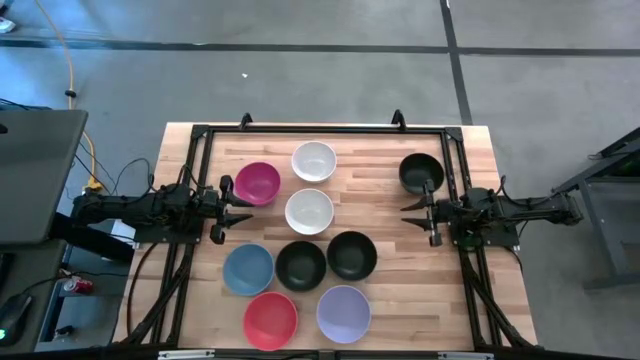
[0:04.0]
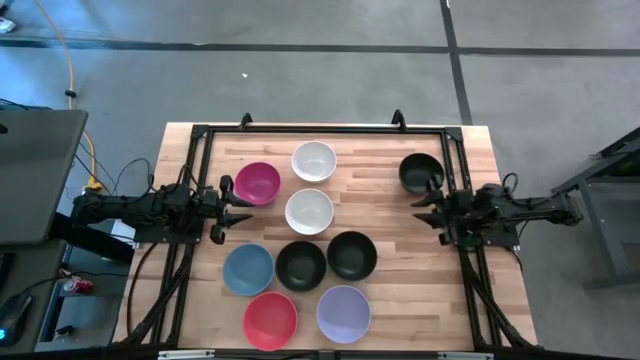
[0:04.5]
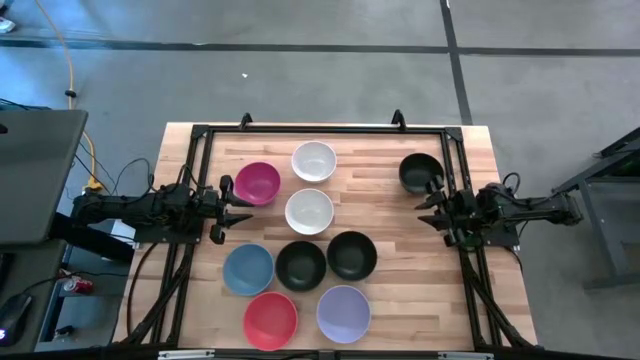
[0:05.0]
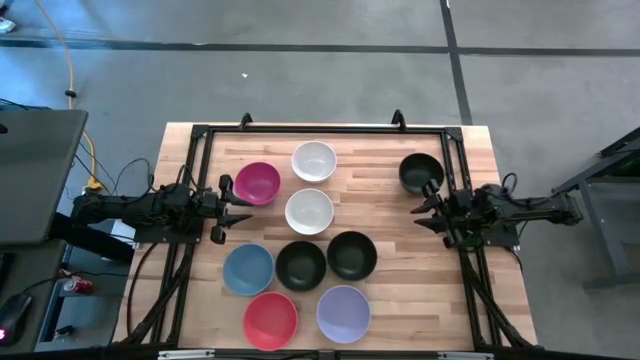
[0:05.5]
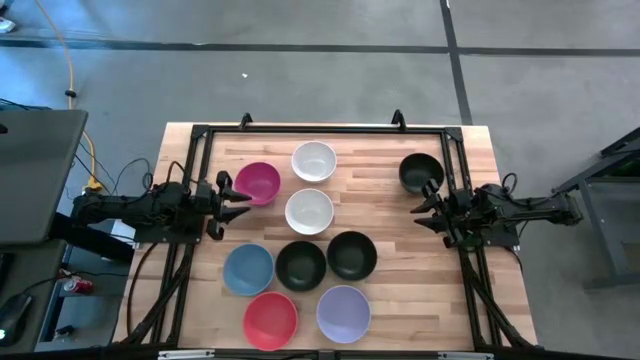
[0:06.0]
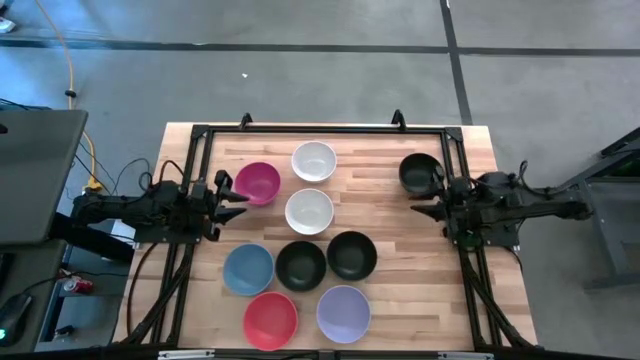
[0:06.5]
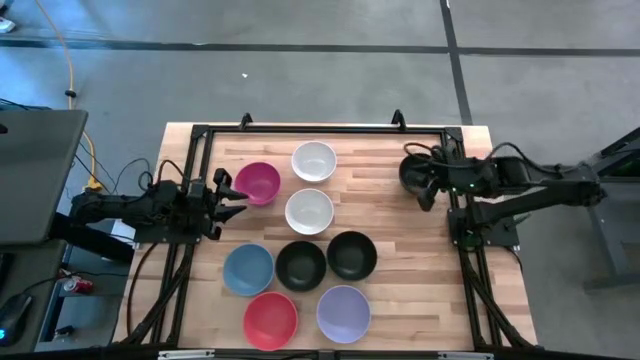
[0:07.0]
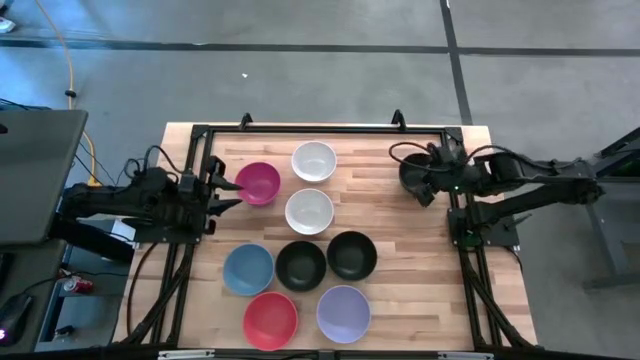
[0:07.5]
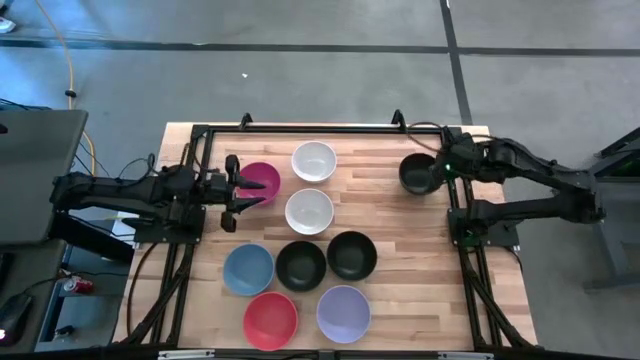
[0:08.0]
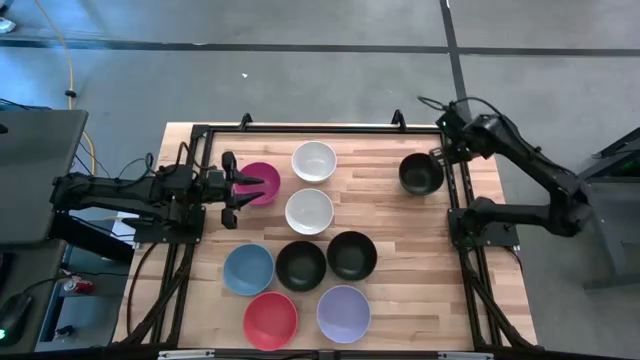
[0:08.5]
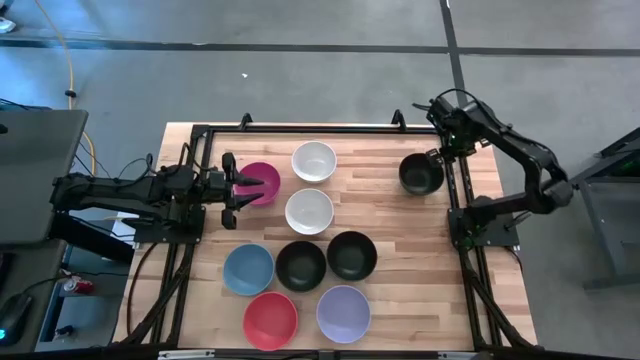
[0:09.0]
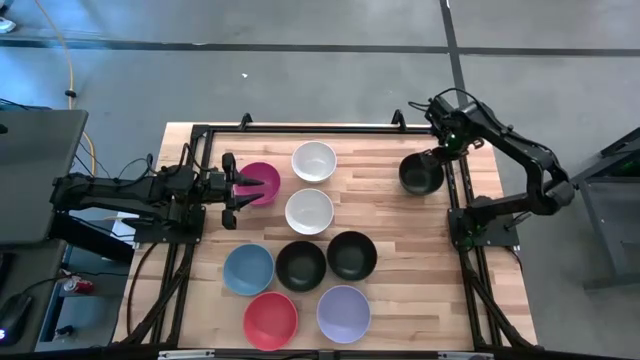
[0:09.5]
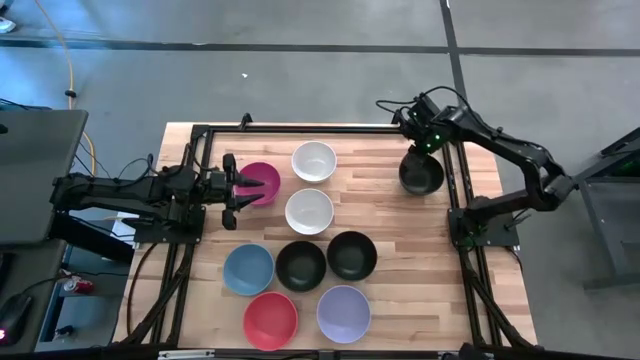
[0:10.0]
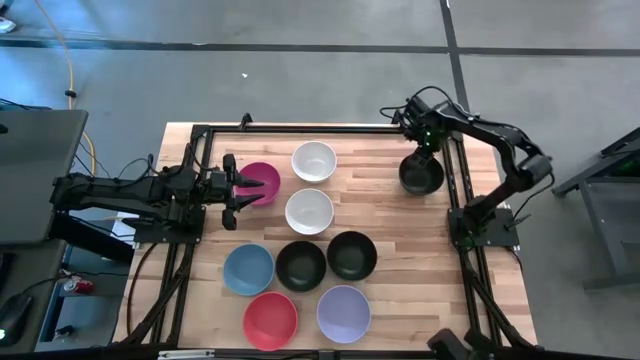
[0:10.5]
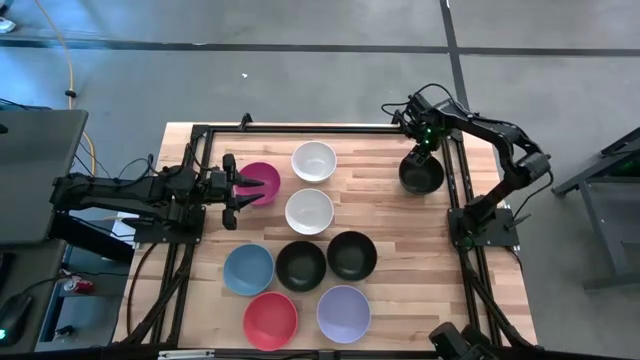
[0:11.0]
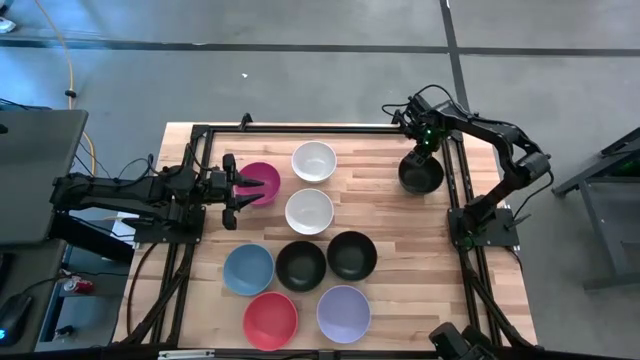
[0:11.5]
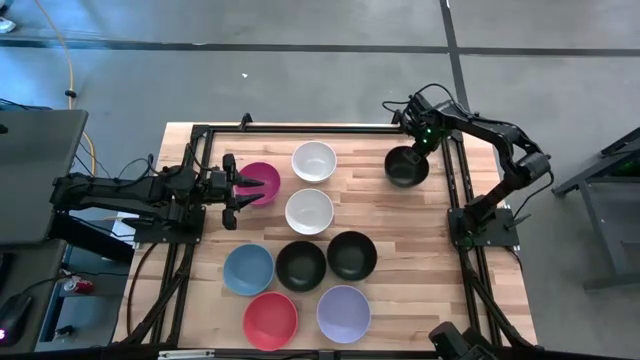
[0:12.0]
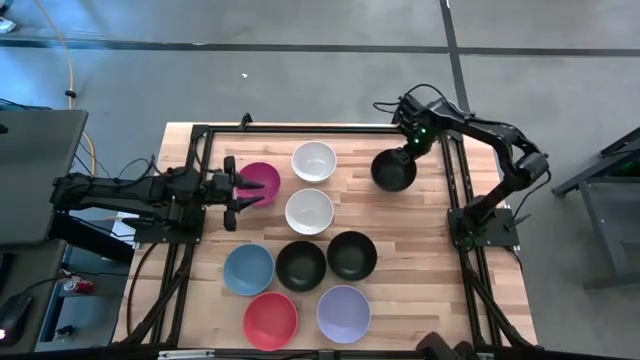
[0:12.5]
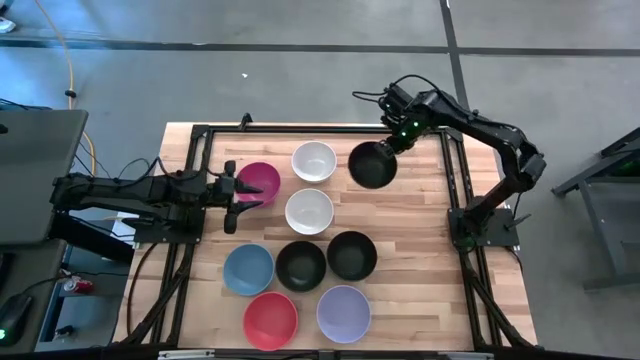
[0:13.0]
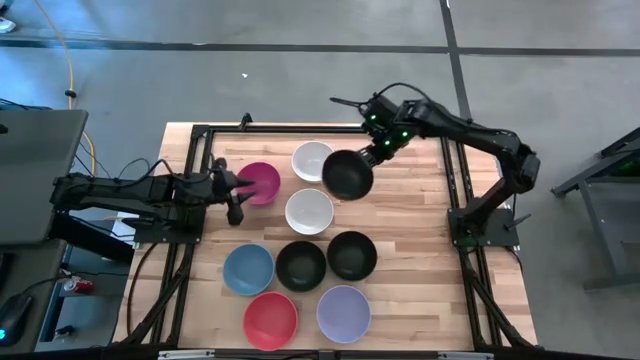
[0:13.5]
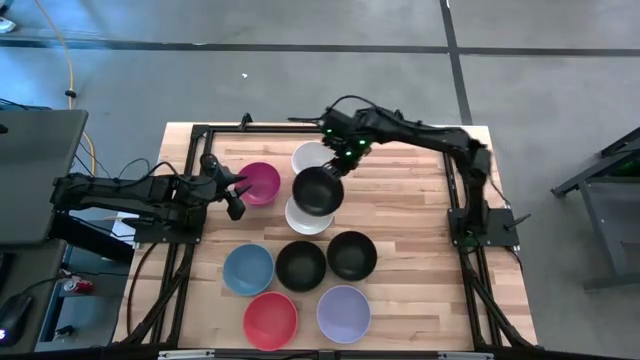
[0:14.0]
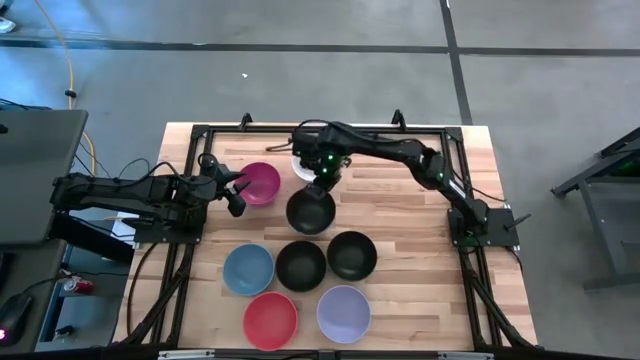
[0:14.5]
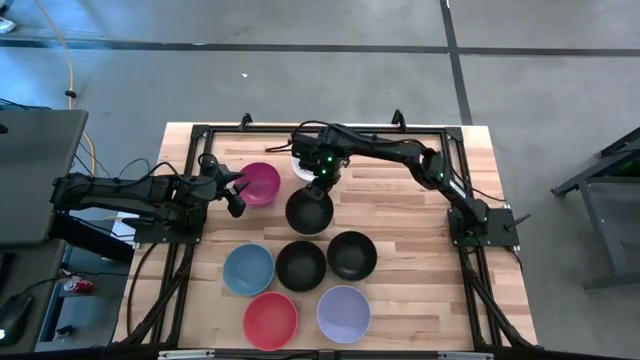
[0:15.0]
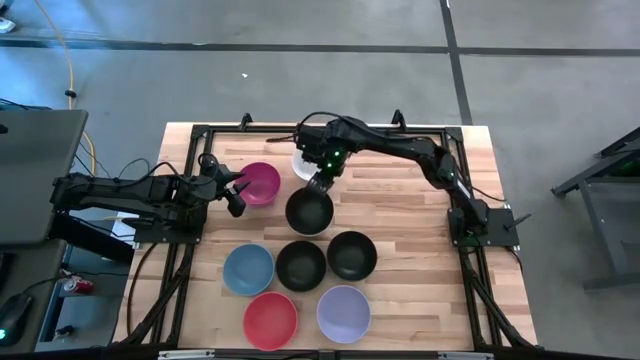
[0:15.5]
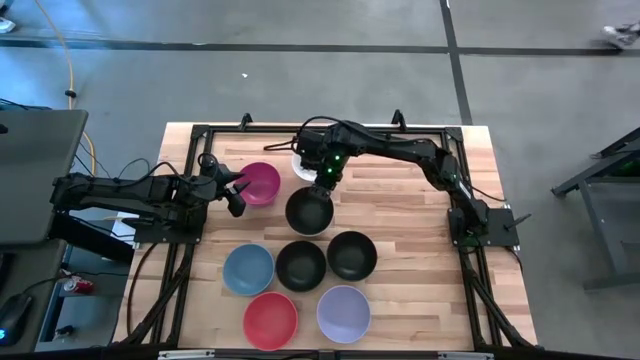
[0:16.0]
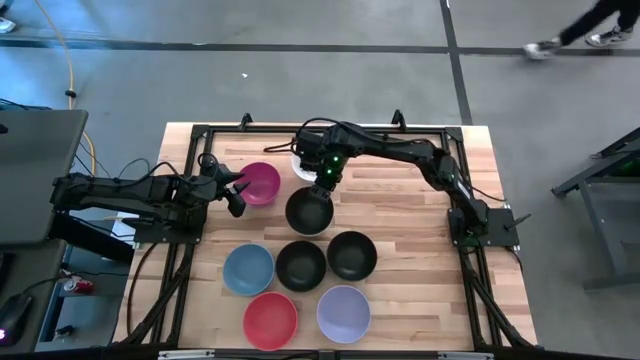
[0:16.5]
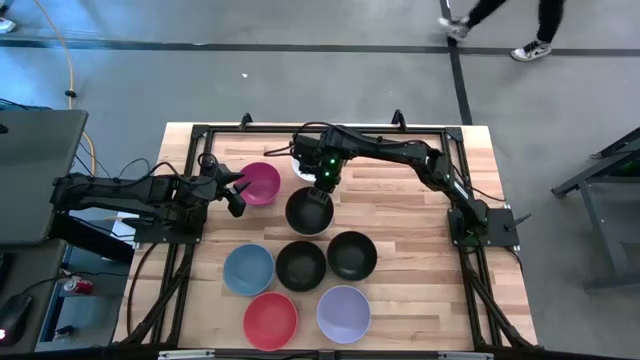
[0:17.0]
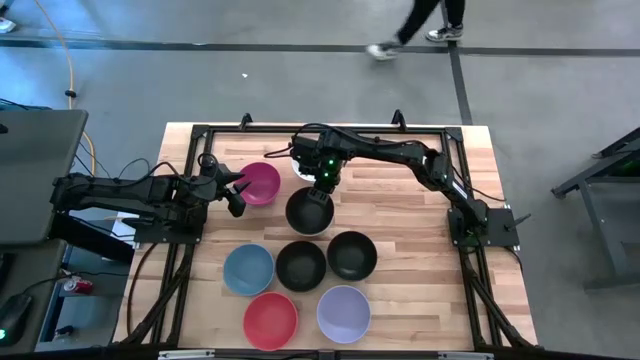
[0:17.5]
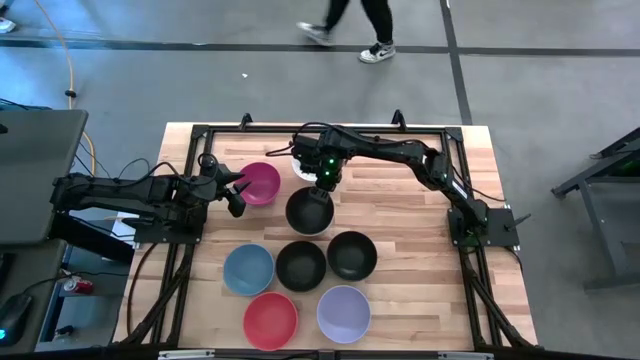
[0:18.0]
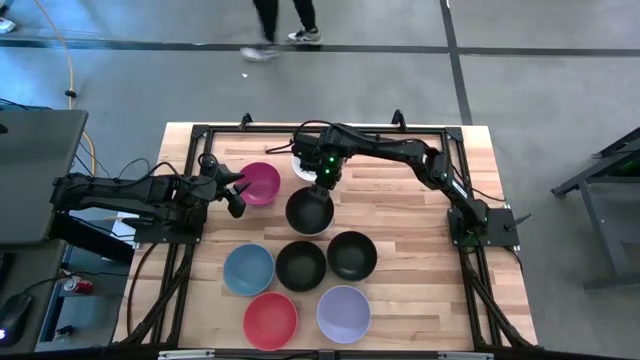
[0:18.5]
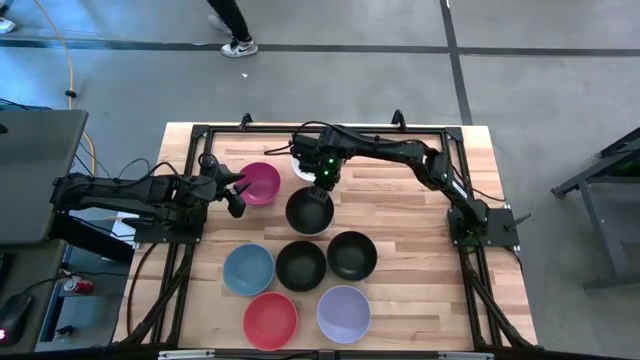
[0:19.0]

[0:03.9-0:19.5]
Task: Nest bowls inside each other
Stack the top black bowl on top of the bottom white bowl

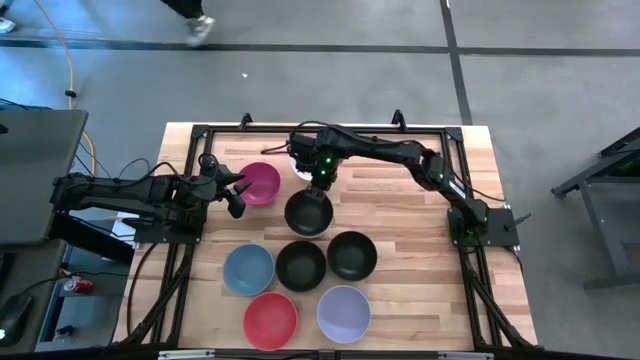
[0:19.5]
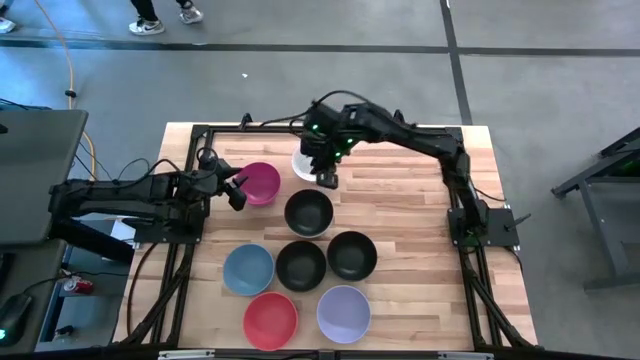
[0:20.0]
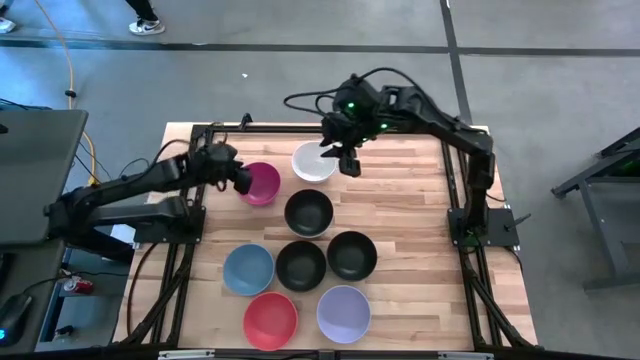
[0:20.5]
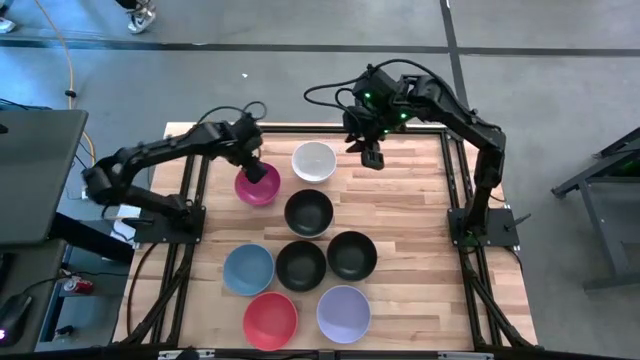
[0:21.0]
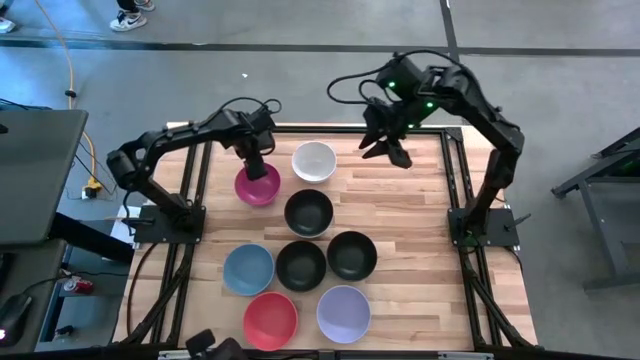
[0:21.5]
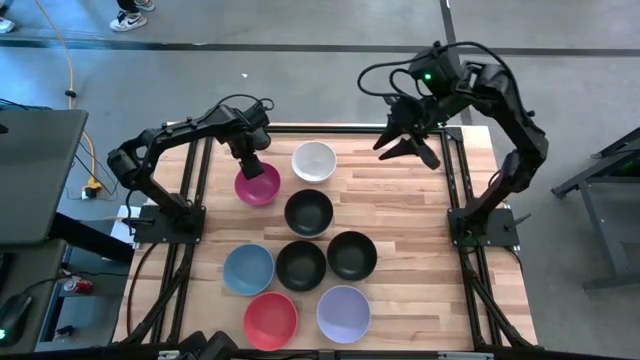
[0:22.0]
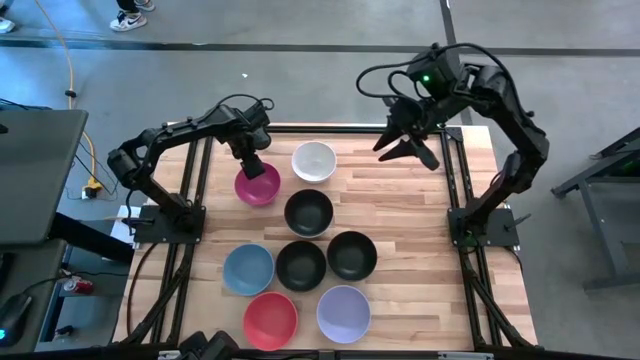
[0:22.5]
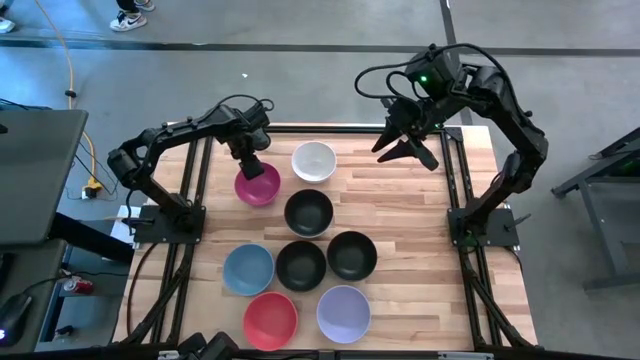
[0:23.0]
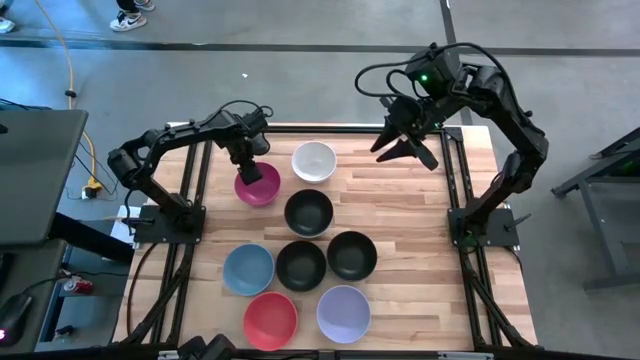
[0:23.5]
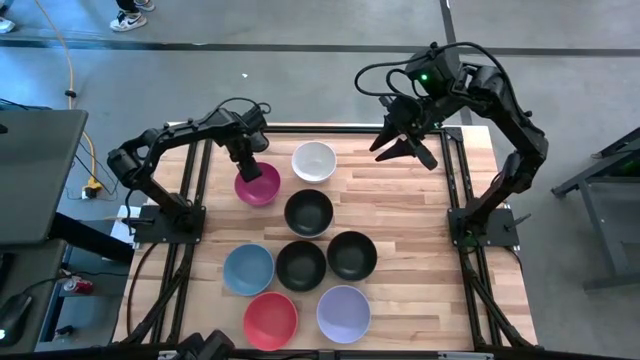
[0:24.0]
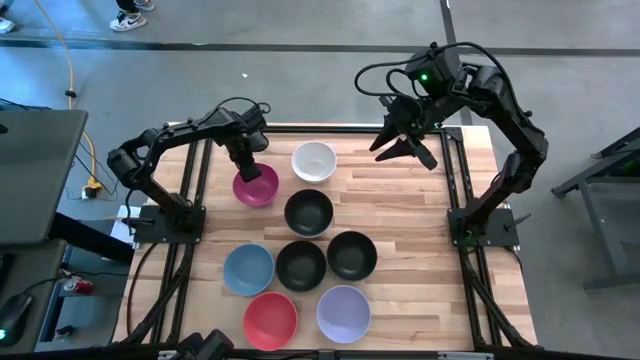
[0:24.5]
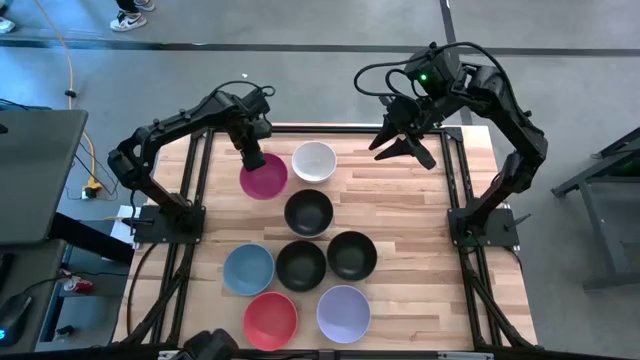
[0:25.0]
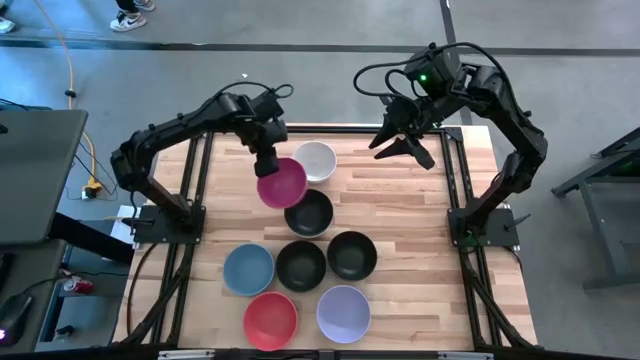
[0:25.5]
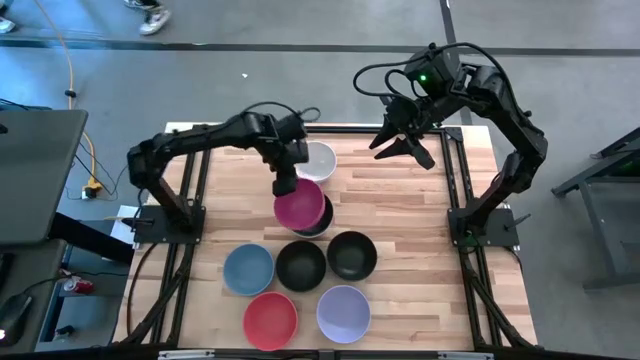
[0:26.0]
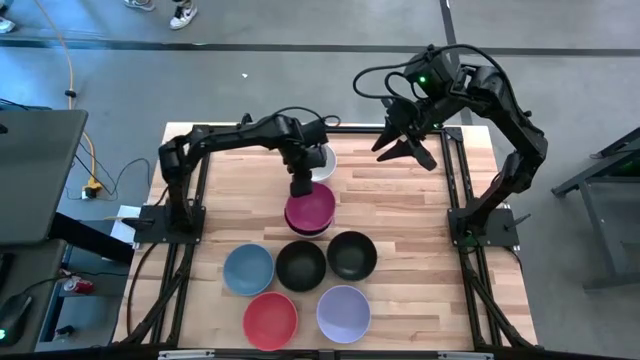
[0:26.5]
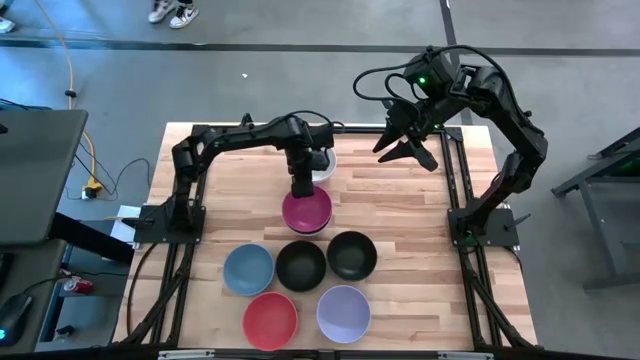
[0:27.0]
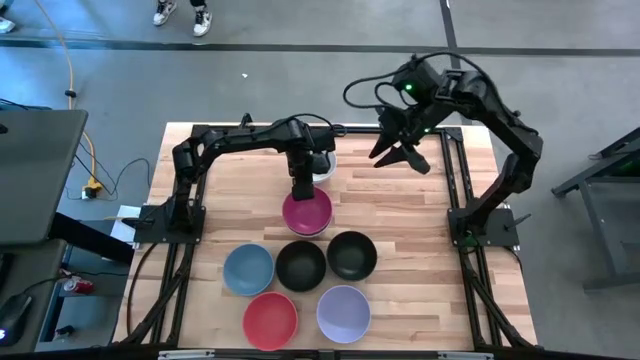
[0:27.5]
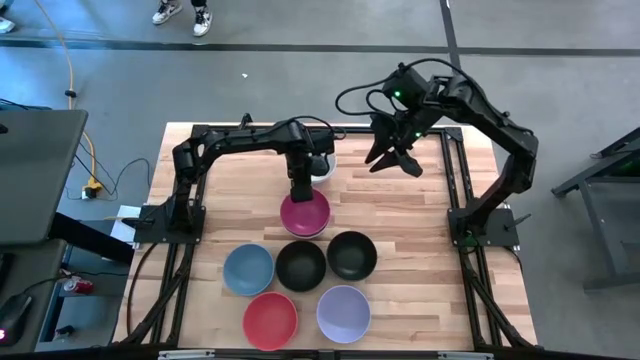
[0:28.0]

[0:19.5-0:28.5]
Stack the pink bowl on top of the black bowl
